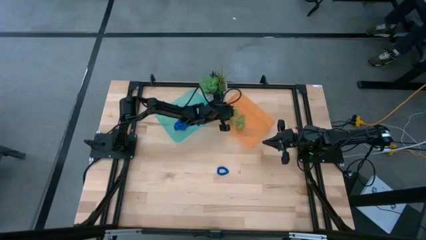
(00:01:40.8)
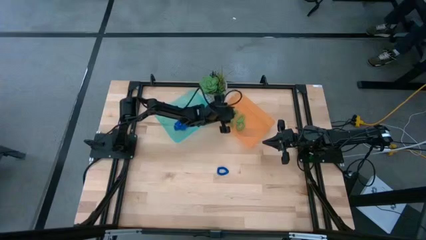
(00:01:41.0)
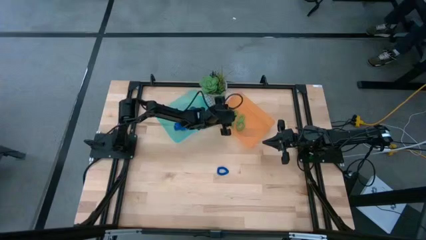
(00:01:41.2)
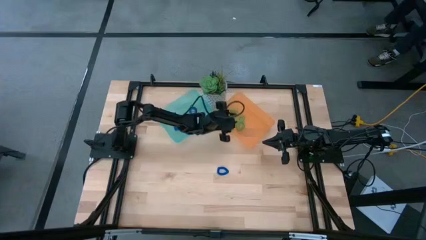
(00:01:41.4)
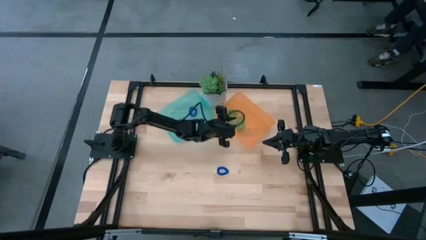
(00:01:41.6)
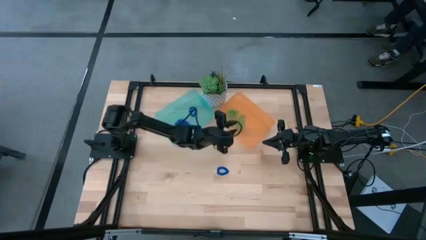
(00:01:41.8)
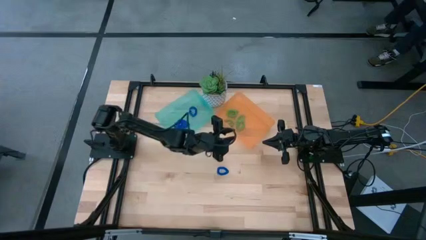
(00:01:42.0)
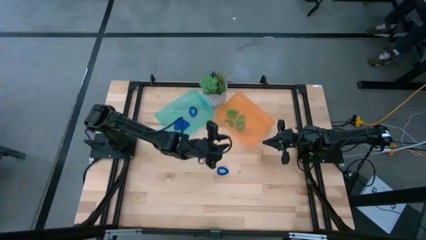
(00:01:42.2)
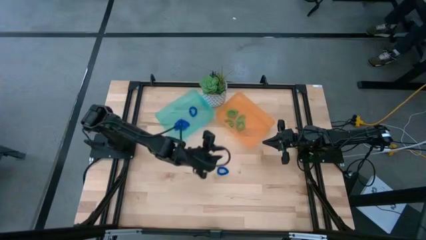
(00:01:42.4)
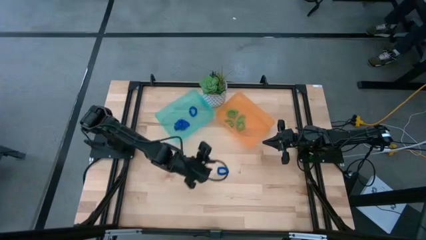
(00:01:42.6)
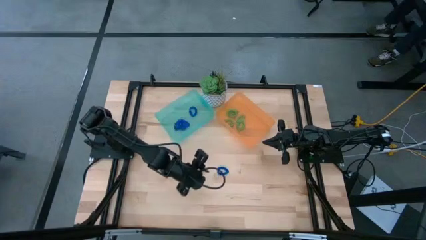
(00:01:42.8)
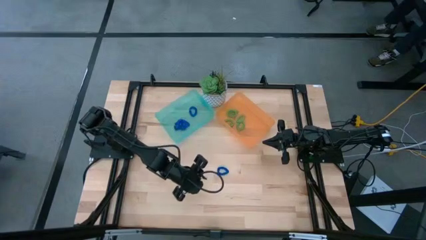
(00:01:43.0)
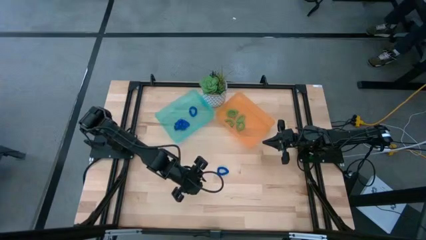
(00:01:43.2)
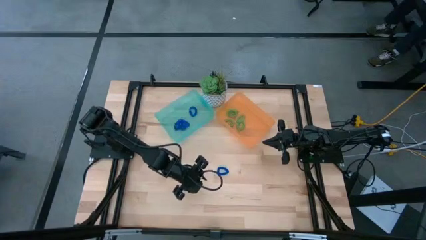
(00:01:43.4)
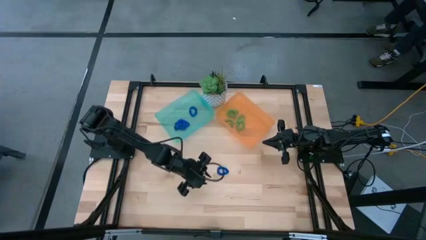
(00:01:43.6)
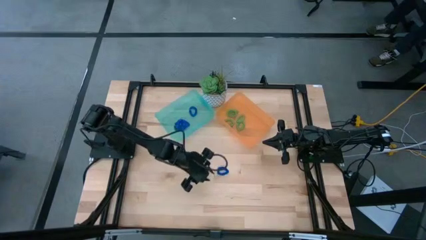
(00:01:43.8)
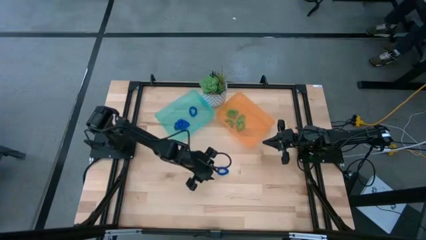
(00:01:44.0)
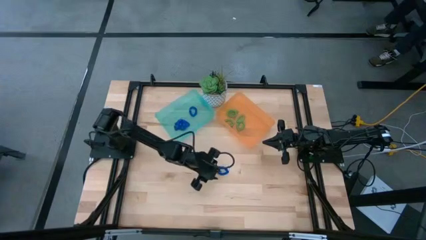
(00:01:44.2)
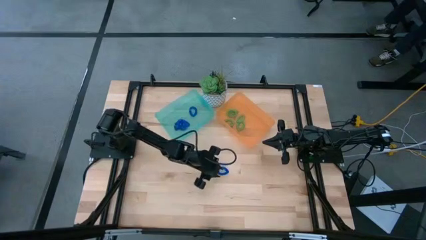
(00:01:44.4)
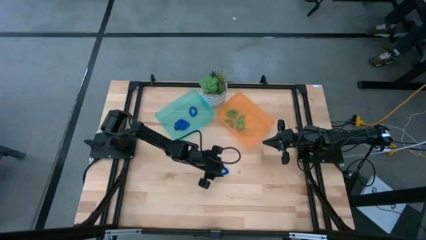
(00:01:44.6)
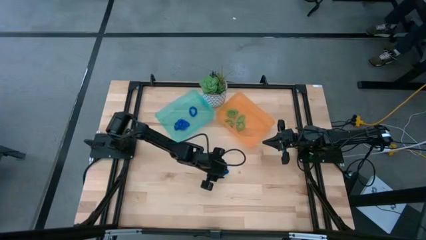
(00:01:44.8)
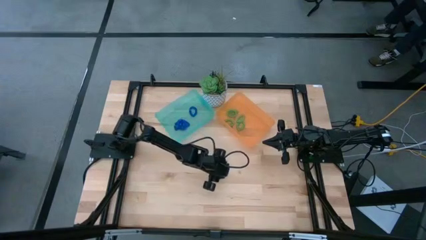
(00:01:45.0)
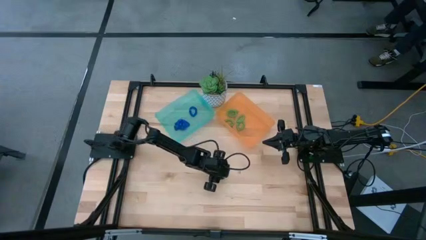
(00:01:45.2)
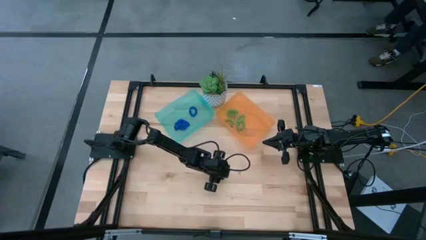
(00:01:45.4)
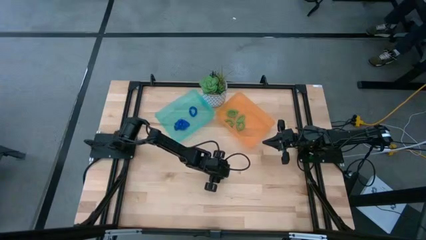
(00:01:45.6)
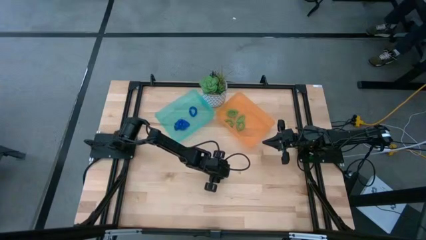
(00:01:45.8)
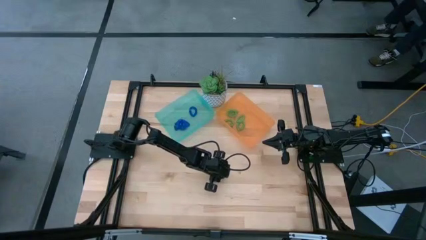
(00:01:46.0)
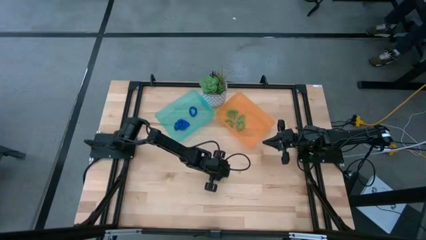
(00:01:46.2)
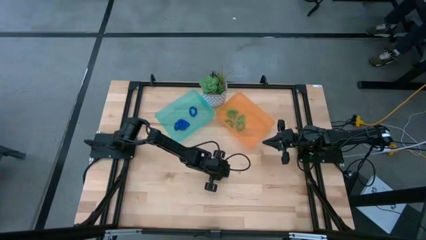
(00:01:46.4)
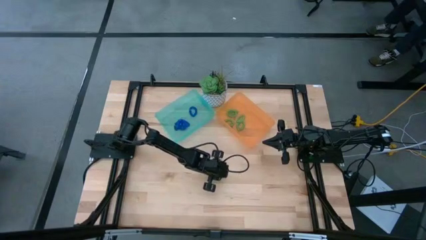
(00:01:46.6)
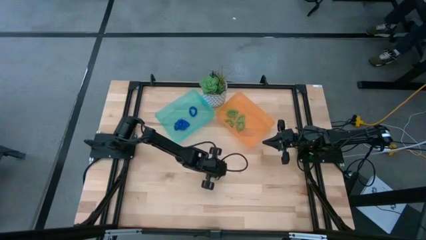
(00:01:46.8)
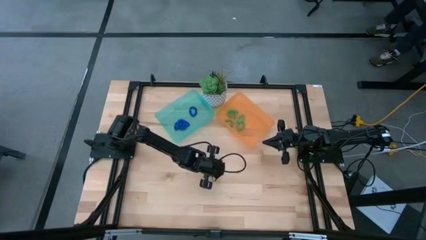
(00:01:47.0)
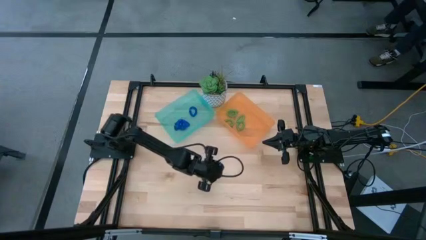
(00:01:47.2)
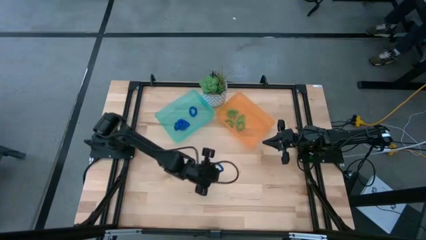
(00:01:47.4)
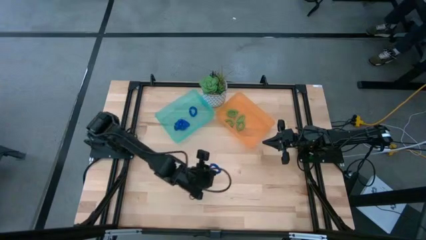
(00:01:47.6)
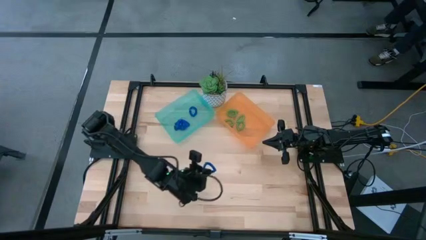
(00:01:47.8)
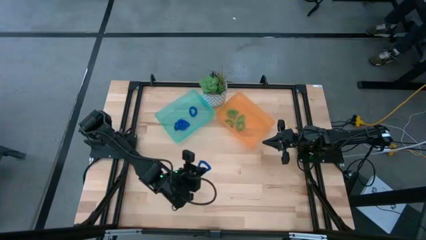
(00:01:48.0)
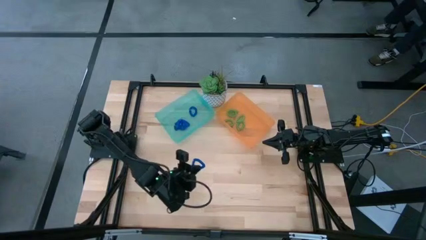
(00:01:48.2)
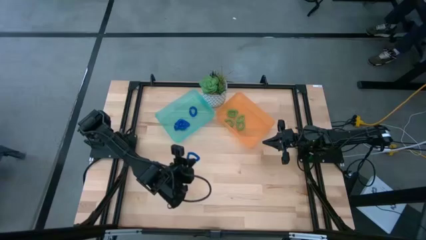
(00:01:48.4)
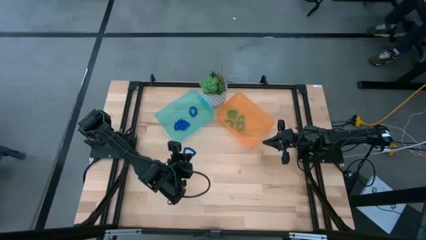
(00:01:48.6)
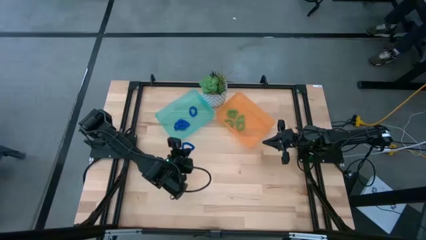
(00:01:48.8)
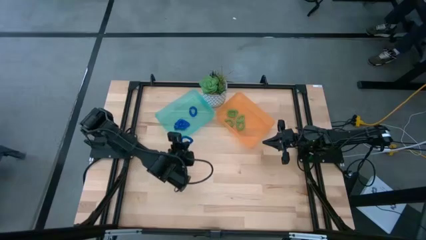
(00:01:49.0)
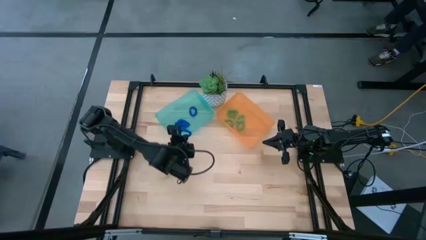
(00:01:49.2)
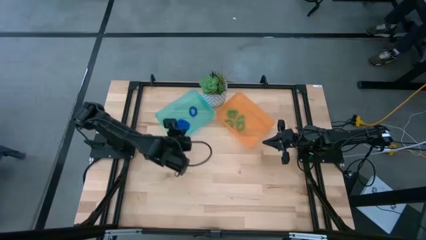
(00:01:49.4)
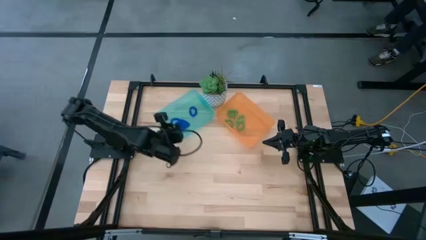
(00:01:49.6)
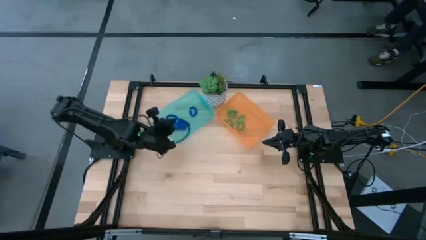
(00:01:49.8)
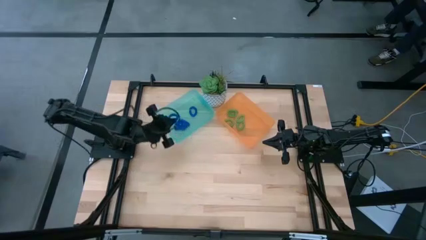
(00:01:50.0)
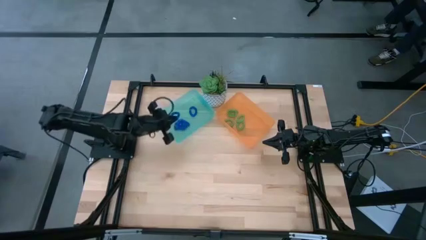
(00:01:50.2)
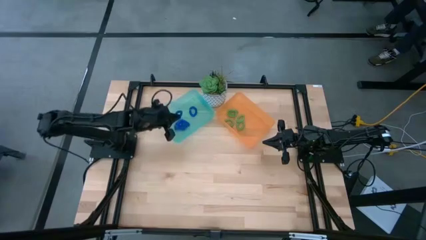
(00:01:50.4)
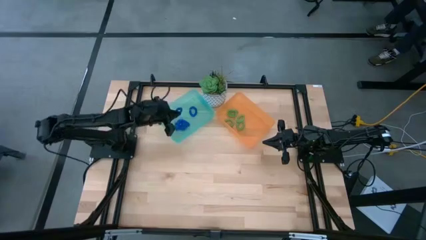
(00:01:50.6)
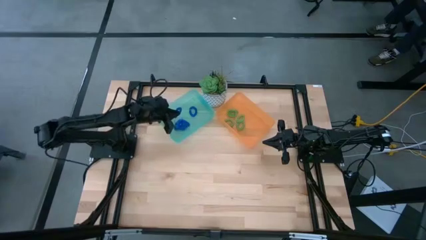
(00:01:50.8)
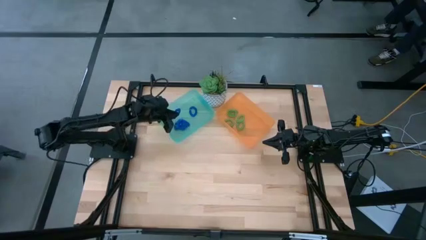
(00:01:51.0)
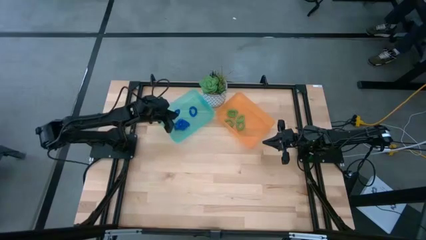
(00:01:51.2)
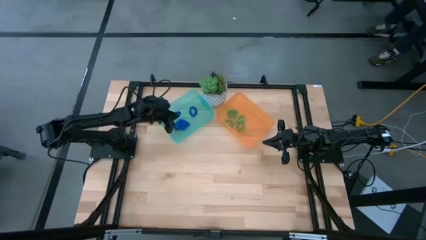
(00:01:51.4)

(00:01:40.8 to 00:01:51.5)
Task: Sort spring keychains
Put the blue spring keychain into the green bin

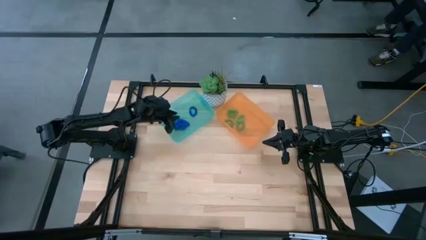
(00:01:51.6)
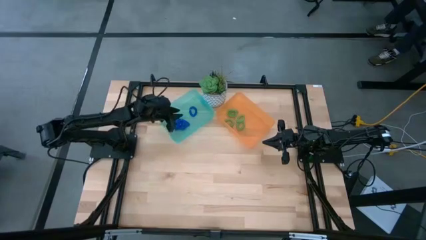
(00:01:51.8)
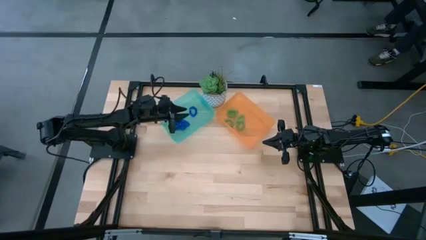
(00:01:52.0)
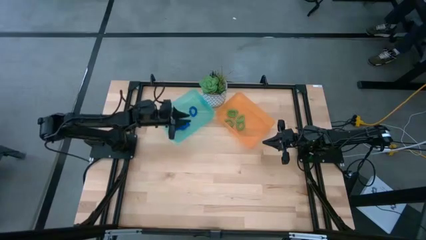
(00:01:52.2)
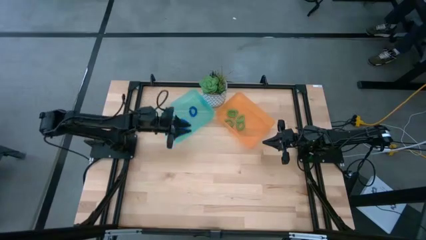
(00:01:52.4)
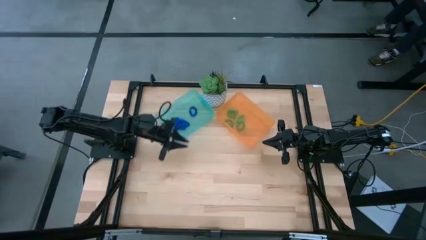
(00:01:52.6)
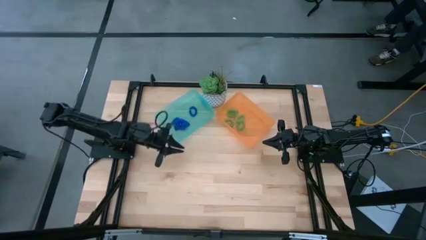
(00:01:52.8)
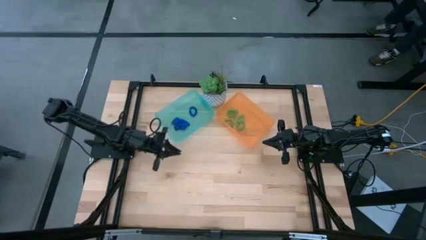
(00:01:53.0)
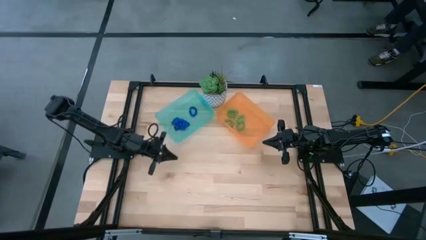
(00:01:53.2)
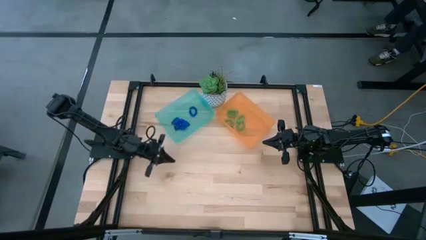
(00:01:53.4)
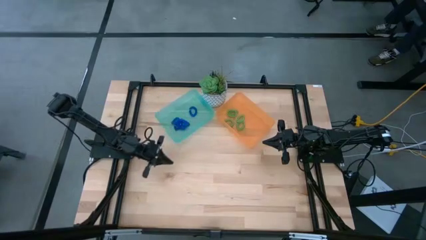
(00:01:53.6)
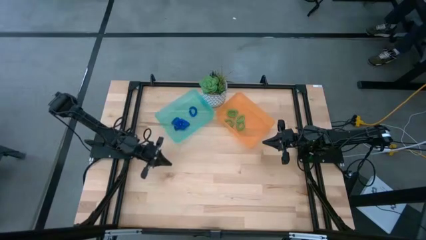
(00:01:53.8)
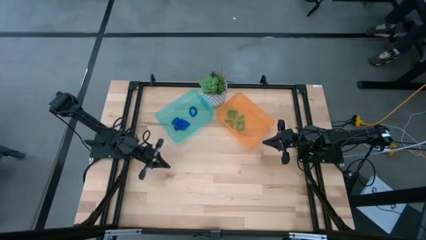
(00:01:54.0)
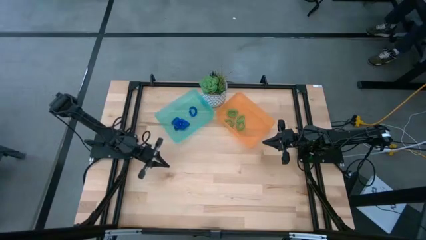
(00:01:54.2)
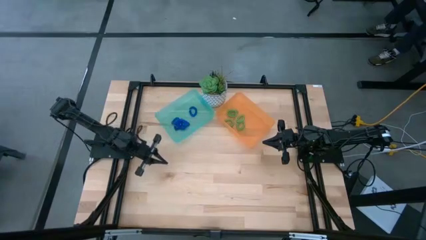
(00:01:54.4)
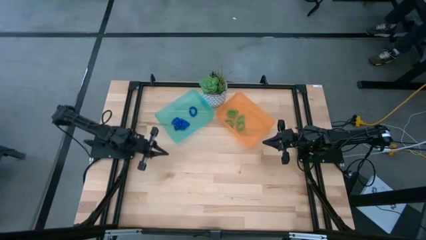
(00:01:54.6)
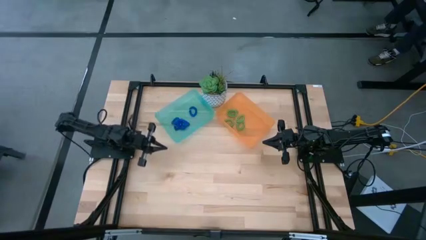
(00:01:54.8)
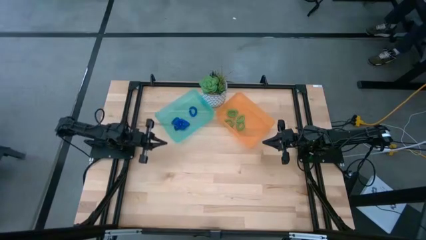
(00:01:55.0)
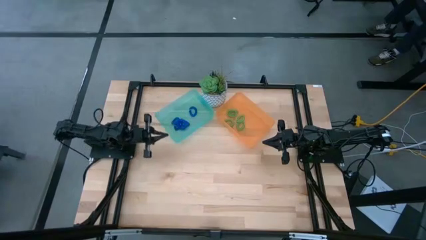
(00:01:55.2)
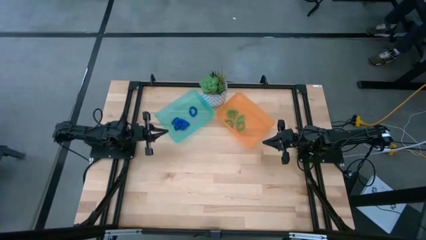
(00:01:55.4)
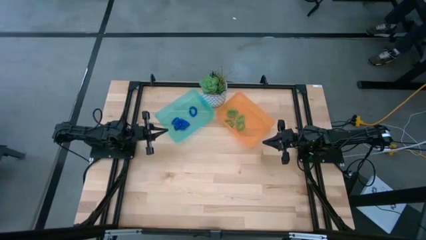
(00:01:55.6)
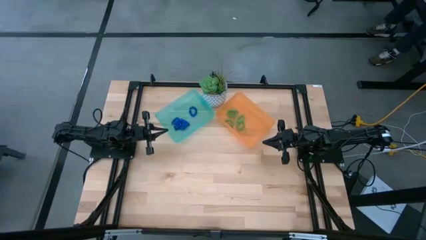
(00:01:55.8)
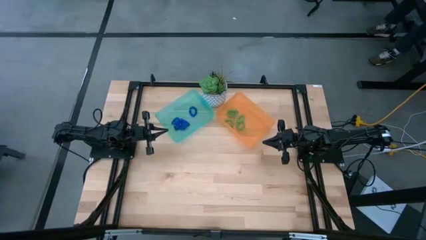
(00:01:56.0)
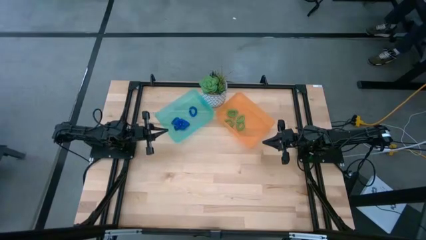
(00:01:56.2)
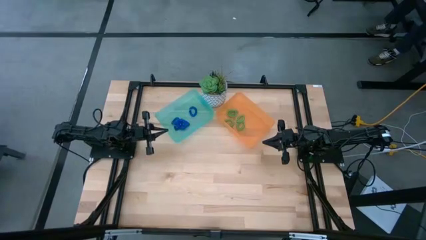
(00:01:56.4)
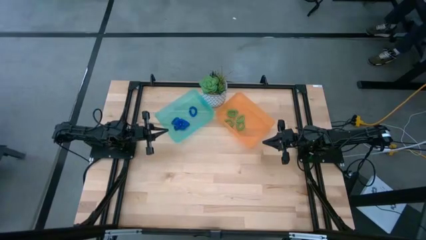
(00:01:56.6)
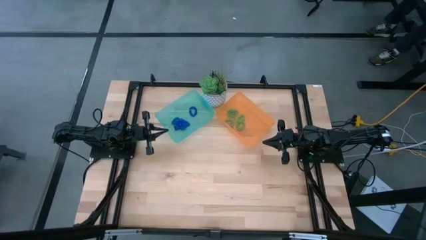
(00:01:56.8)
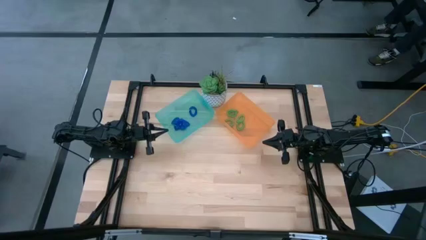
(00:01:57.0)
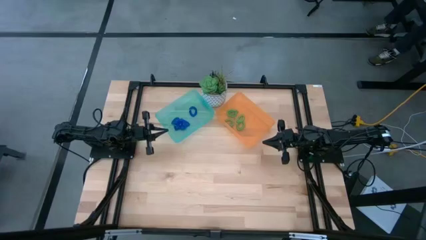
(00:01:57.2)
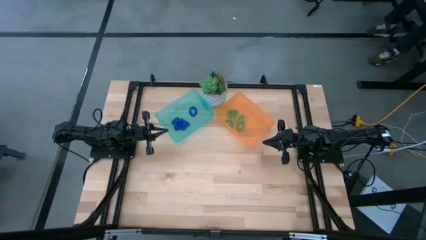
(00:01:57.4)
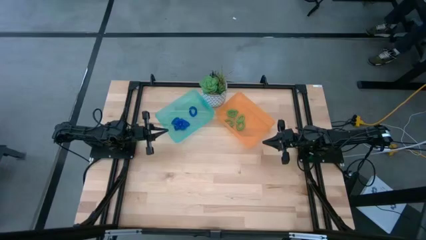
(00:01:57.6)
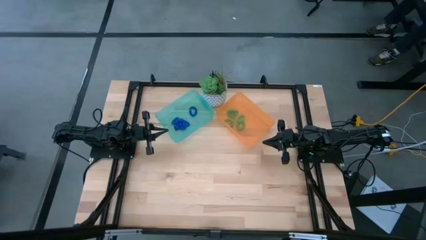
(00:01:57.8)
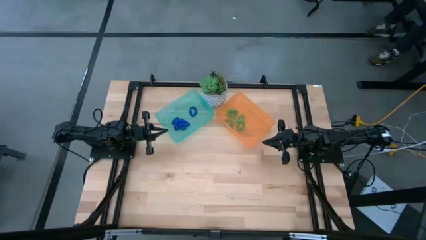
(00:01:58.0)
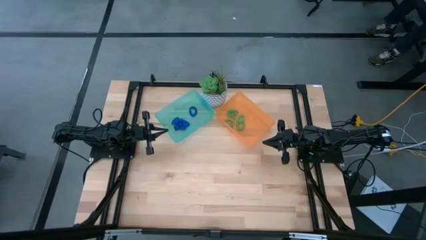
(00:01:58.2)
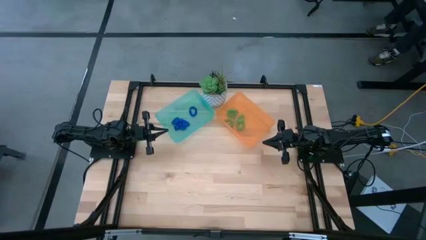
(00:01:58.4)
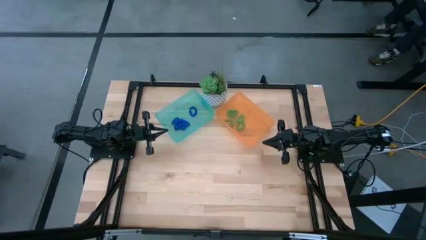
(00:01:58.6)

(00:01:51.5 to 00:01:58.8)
Return to Home Position
